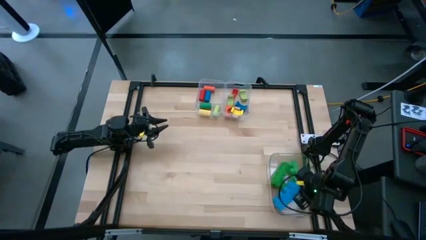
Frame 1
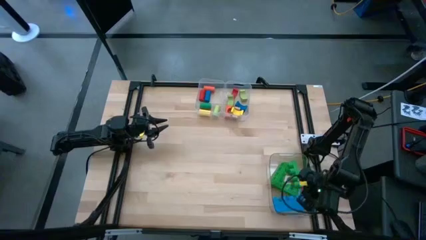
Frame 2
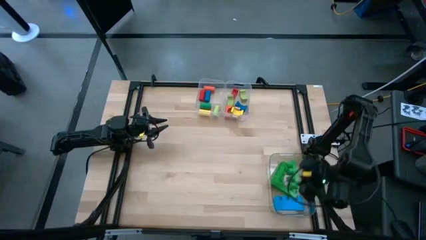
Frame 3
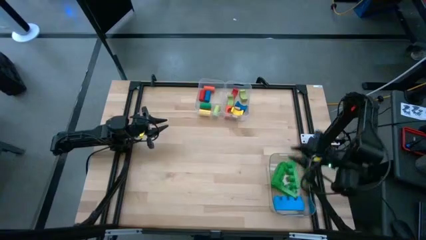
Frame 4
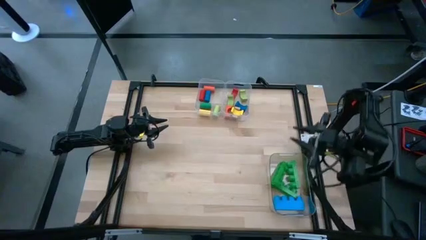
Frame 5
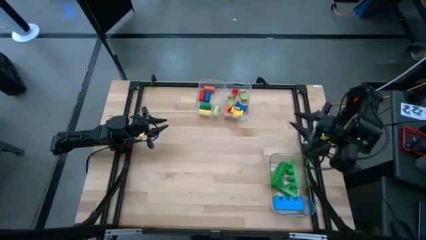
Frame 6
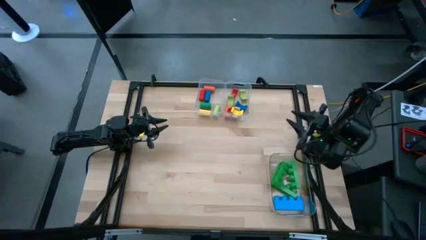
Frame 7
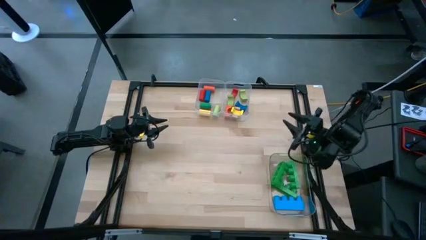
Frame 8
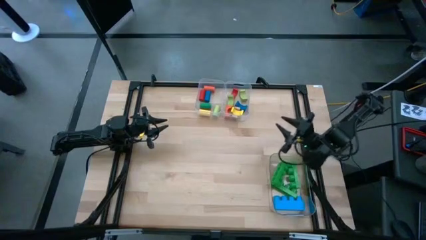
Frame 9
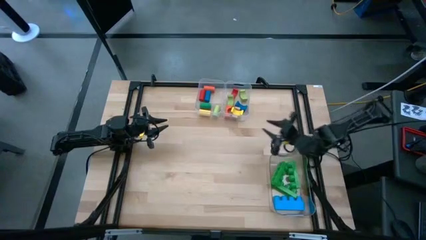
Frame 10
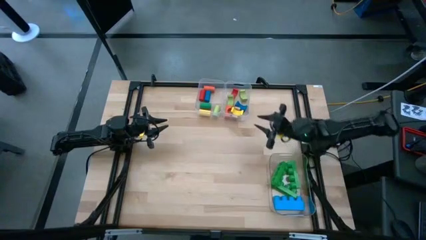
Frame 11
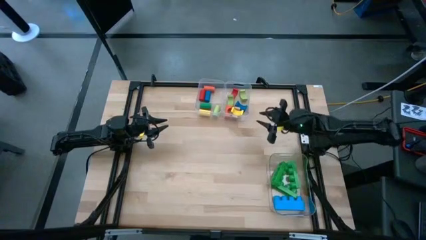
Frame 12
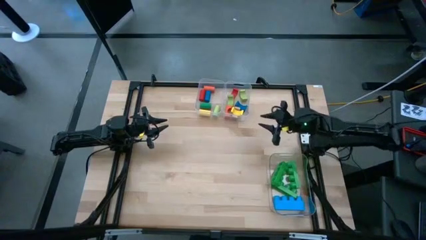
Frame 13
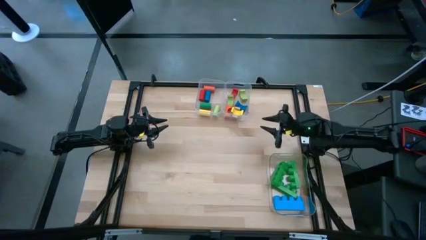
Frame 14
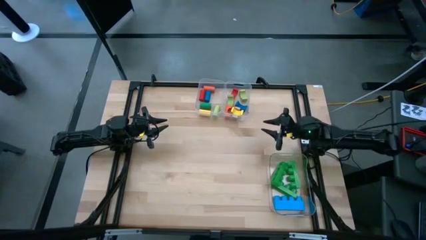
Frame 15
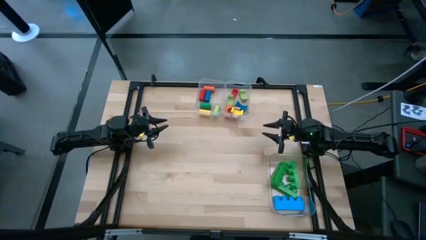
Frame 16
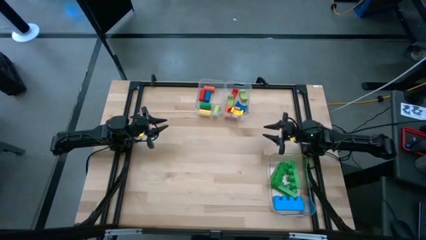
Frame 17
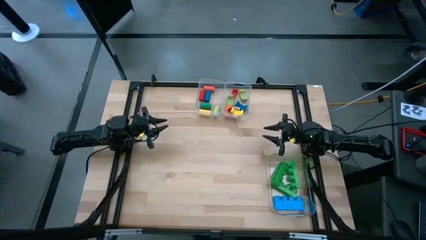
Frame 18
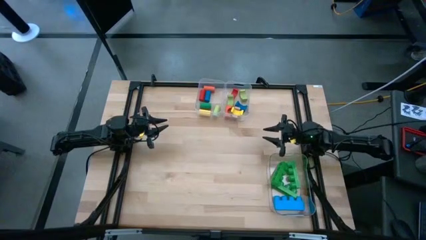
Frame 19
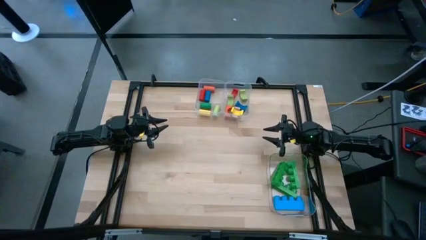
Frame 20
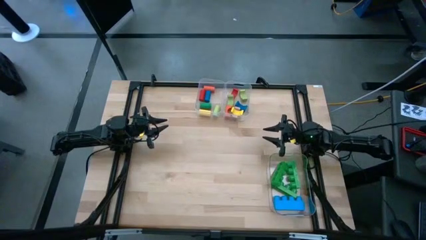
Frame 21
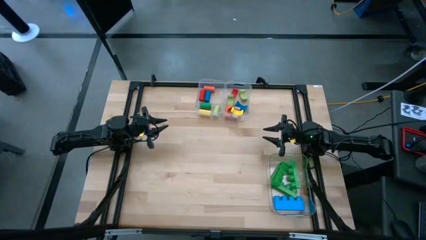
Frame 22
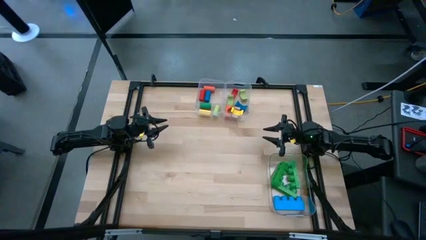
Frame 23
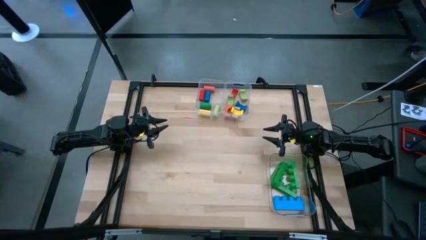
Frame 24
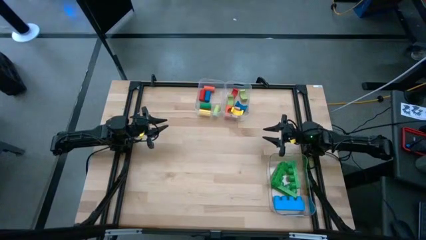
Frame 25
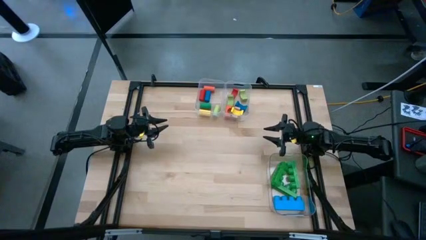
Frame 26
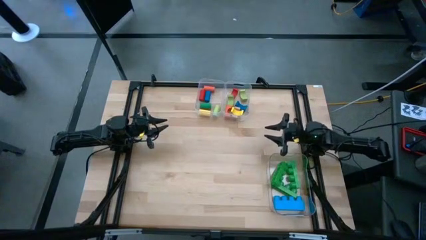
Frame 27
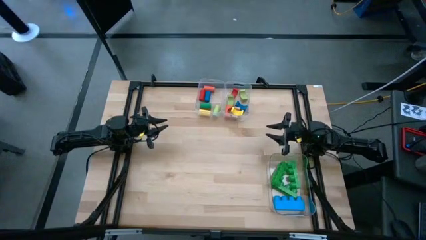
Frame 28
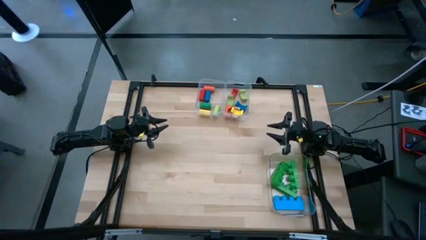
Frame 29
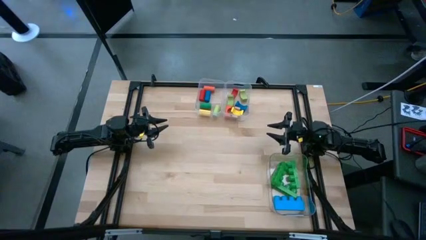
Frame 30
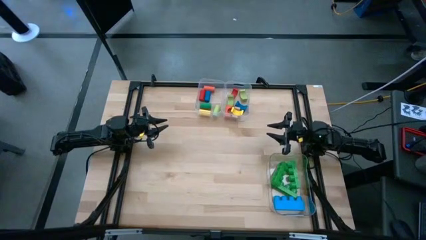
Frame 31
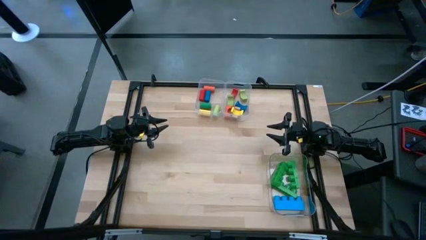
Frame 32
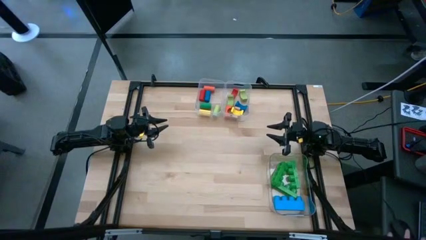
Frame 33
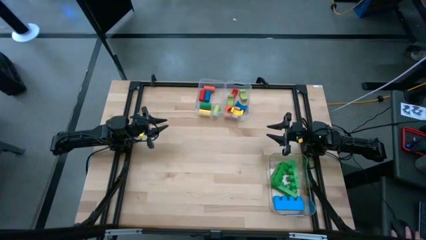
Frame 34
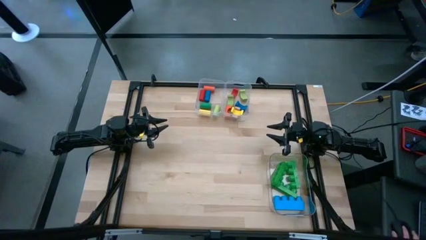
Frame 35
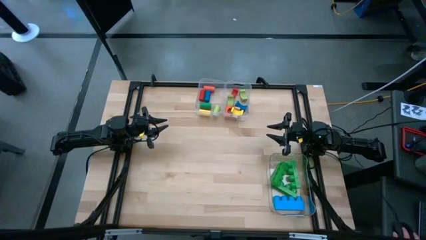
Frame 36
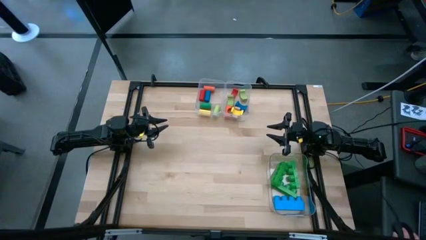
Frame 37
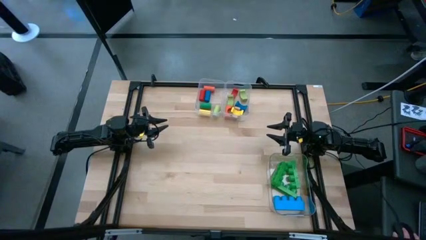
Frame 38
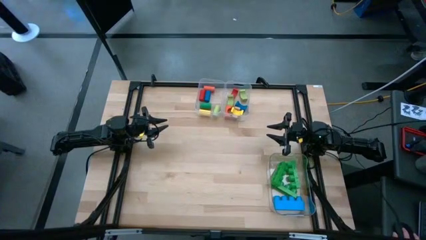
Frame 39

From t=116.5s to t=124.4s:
Task: Sort blocks by size
Return to Home Position

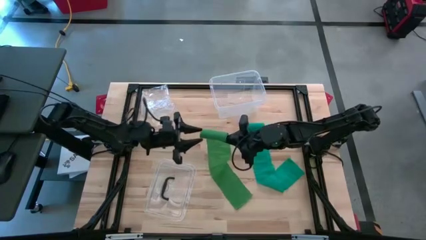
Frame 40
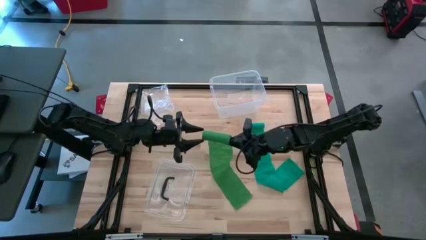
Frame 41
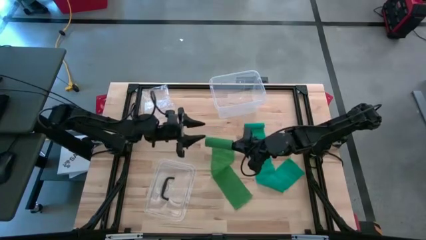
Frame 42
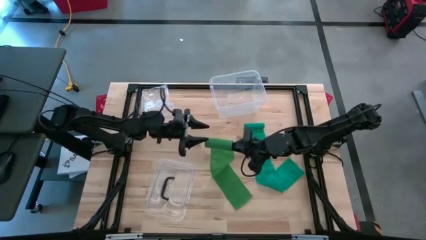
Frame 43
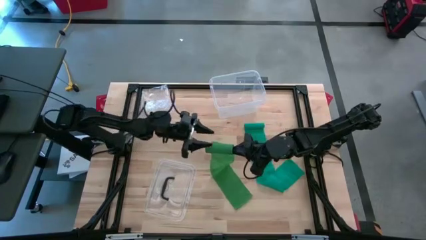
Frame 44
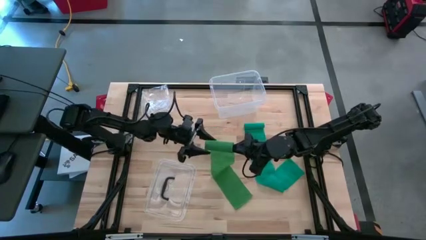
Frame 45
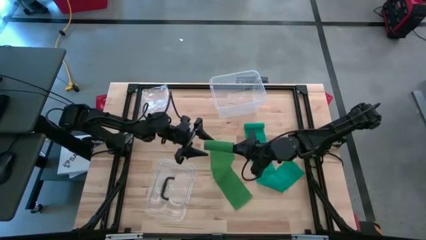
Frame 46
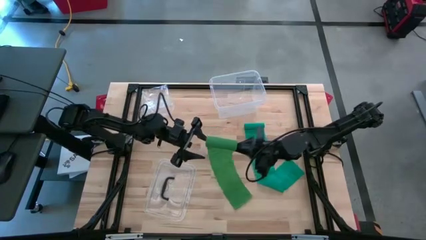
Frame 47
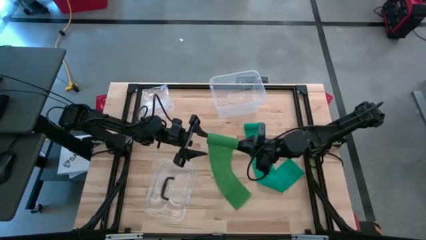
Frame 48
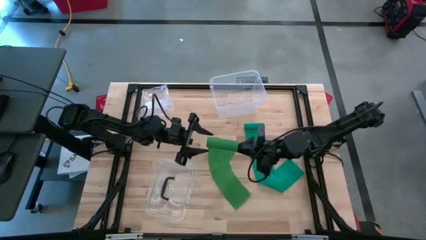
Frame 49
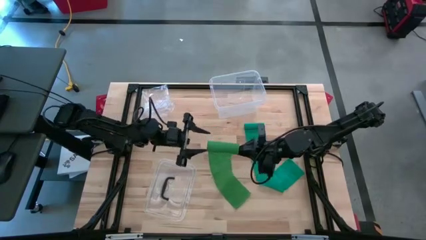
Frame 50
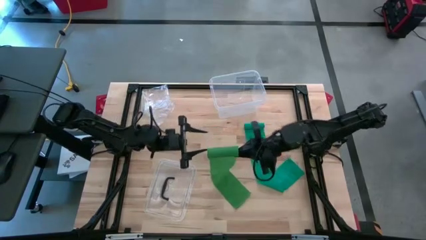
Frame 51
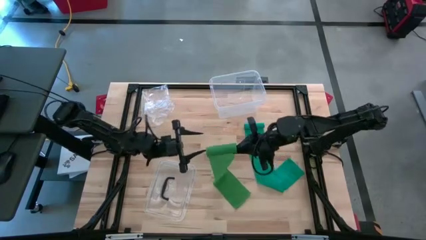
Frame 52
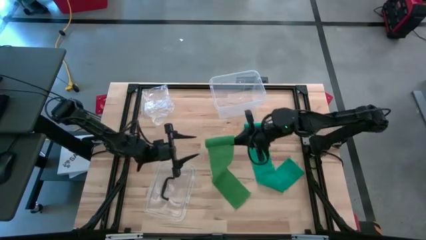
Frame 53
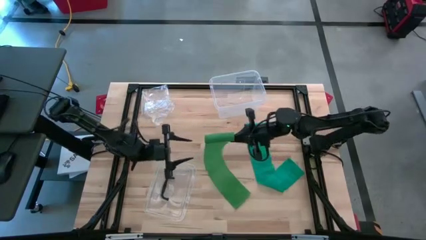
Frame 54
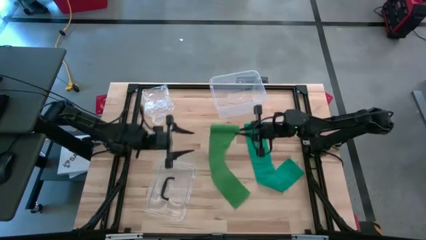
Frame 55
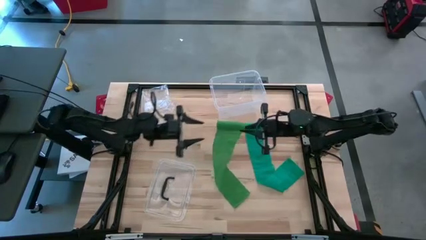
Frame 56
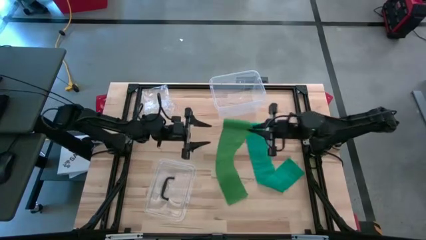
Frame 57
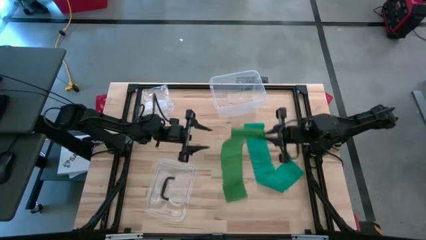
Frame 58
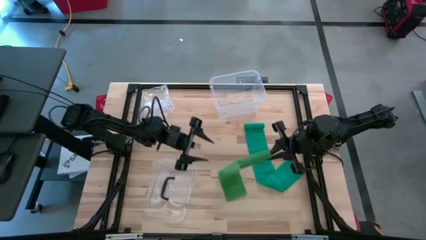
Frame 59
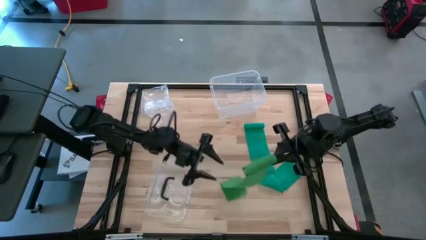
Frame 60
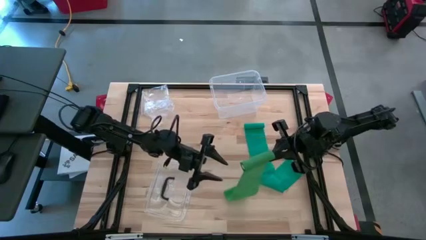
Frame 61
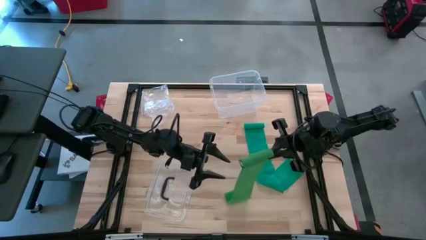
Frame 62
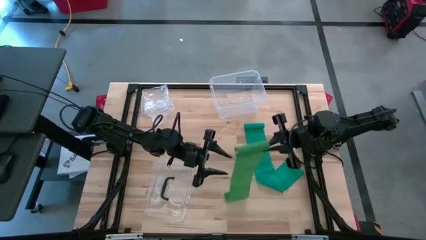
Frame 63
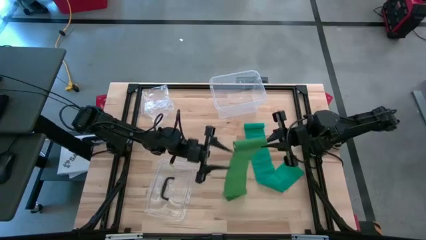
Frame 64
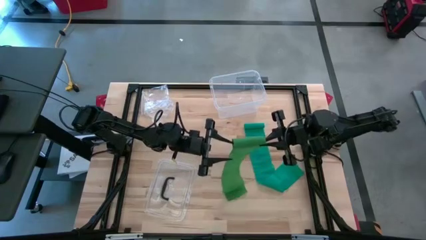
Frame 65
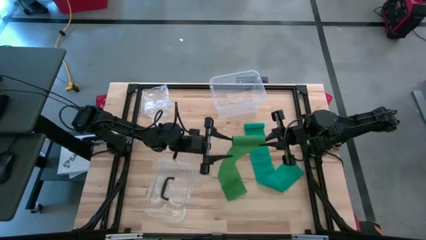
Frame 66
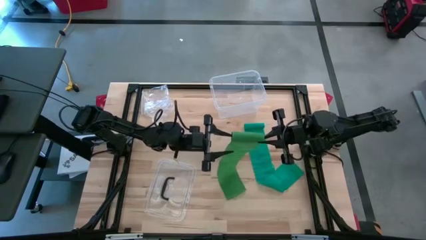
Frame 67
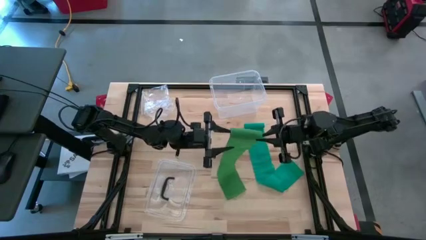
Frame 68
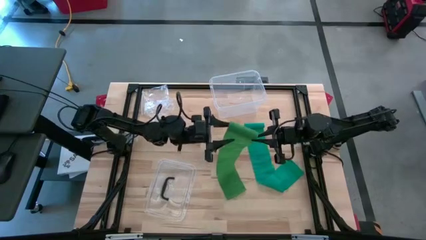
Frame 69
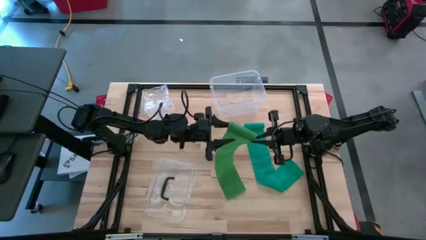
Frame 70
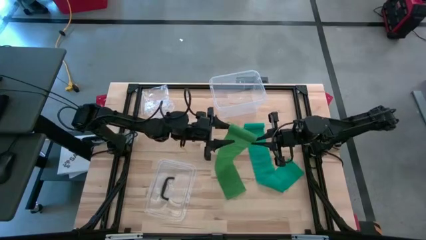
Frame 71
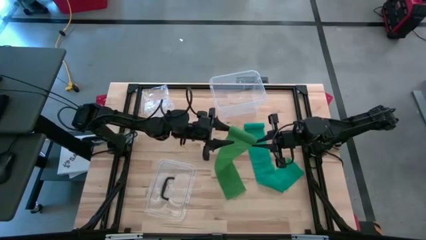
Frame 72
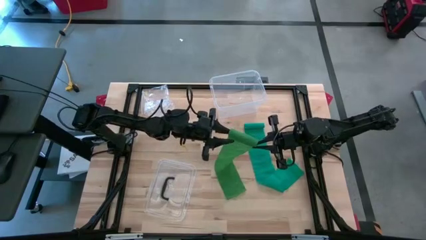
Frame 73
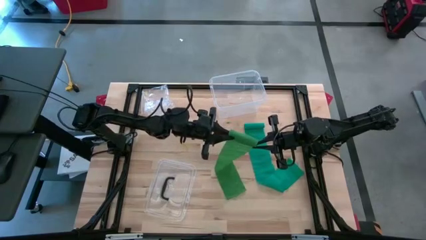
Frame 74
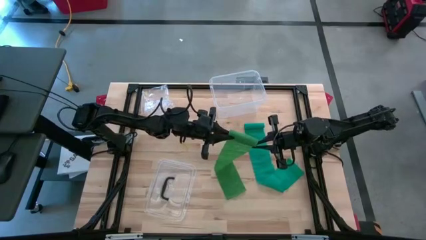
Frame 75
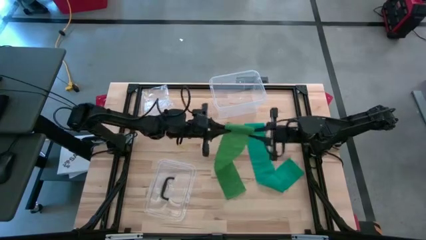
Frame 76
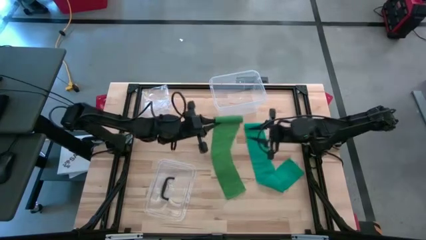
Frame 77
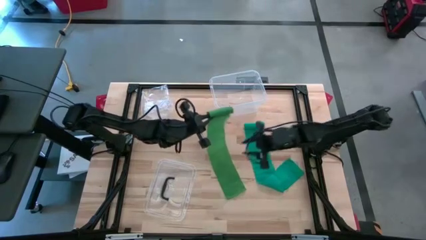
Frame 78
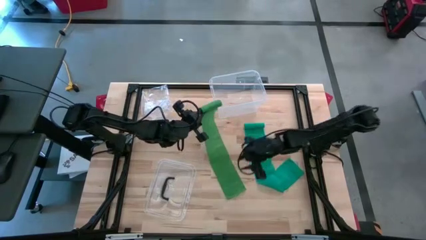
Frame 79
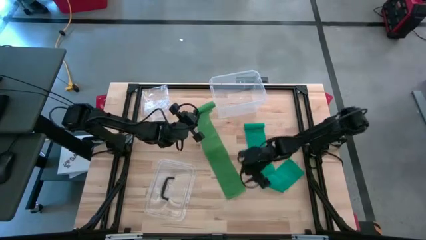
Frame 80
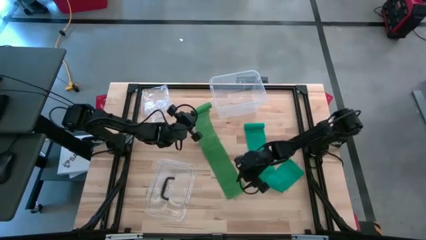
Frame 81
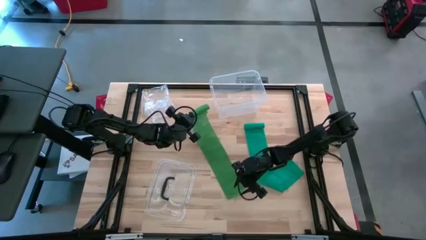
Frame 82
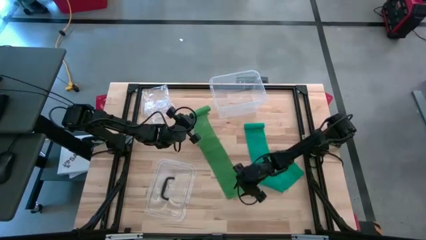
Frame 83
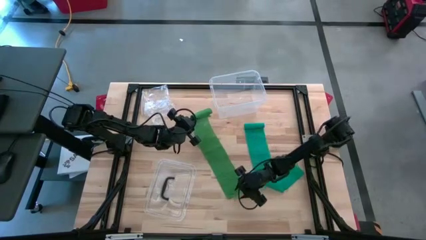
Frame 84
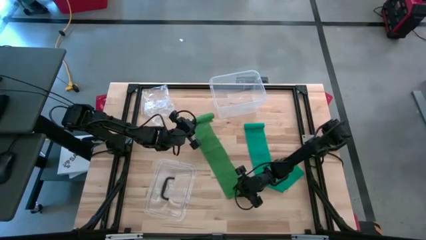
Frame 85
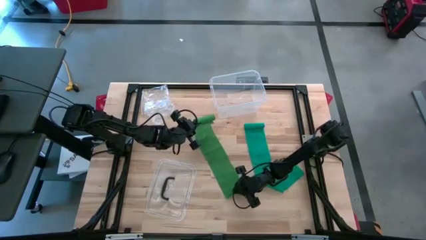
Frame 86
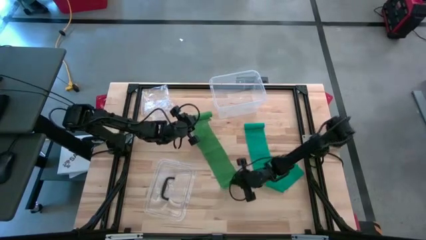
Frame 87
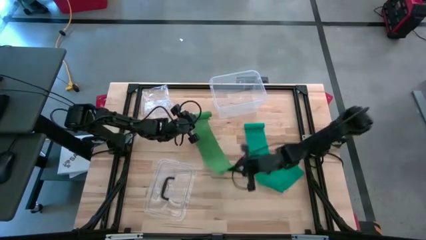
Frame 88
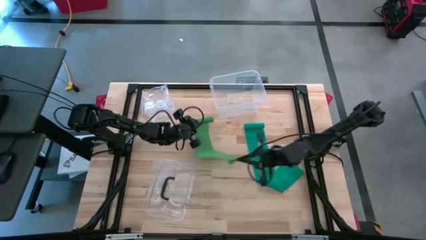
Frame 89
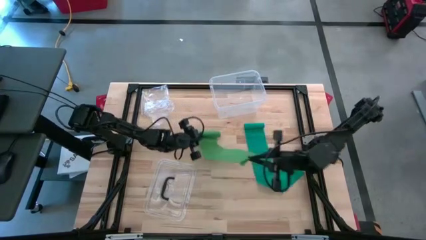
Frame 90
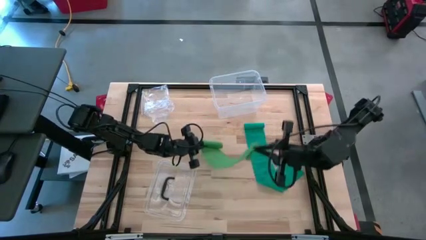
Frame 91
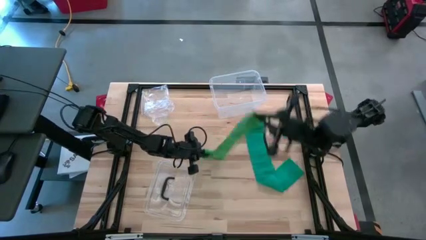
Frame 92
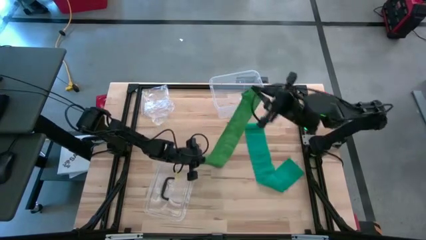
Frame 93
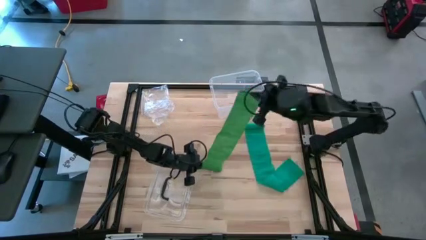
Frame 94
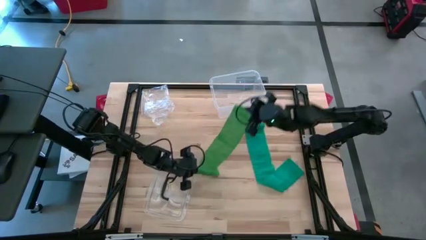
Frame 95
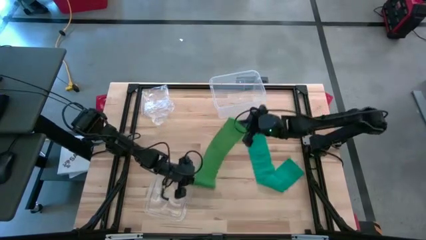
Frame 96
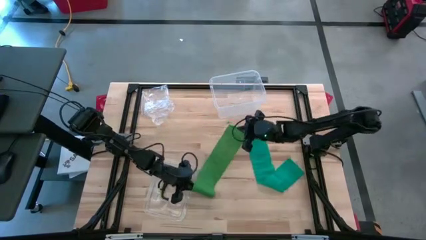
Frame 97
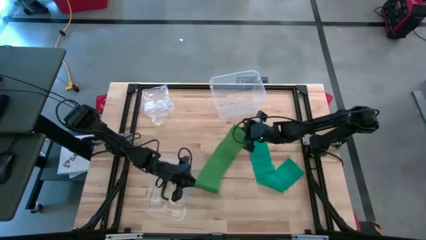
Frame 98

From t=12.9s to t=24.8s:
Task: Roll bandage
Roll the green bandage
